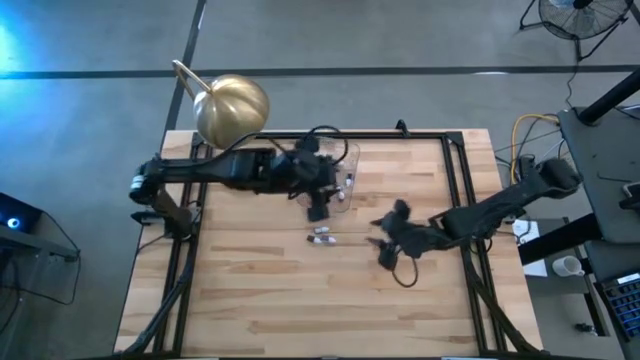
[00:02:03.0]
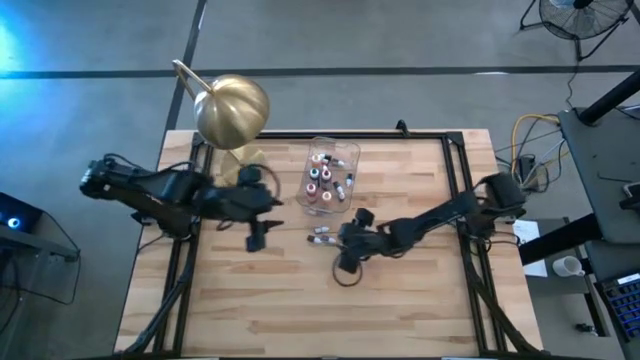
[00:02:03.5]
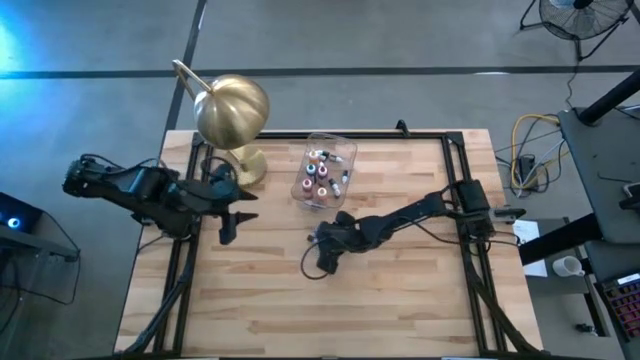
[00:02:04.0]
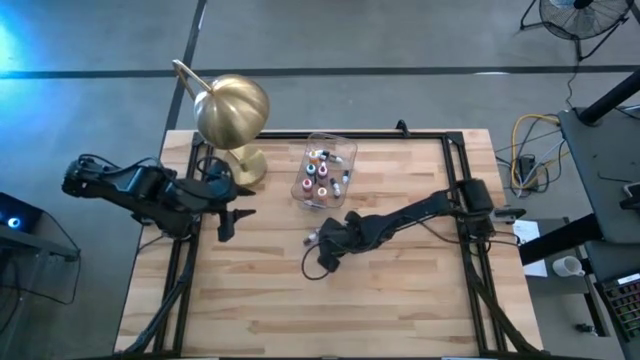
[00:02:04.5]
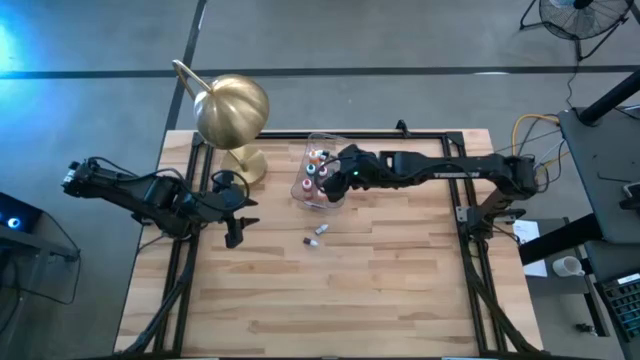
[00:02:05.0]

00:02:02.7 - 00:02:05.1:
Task: Pick & Place food coloring
Put the small purple food coloring bottle into the transparent bin

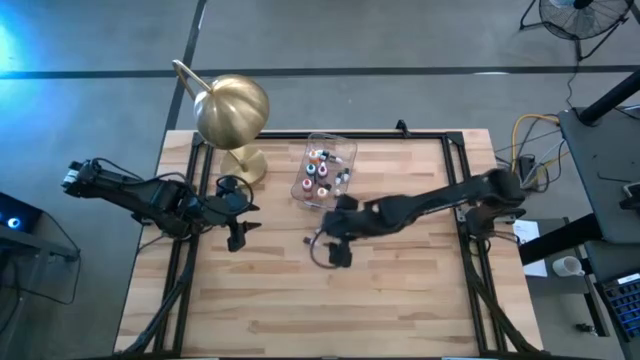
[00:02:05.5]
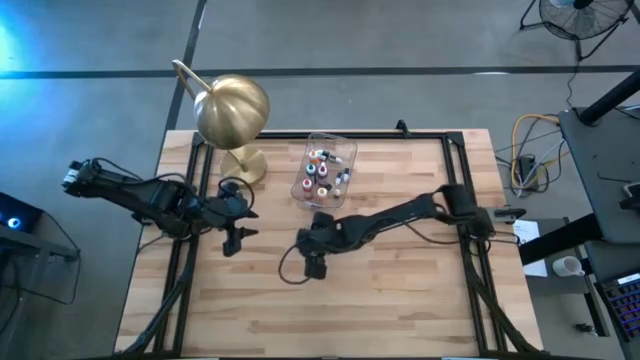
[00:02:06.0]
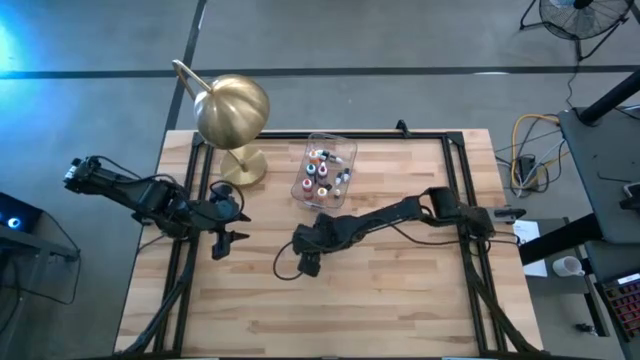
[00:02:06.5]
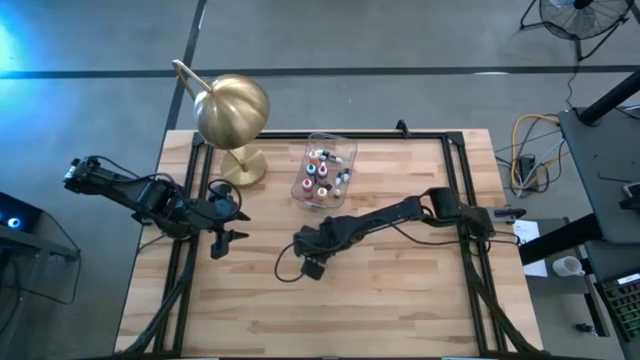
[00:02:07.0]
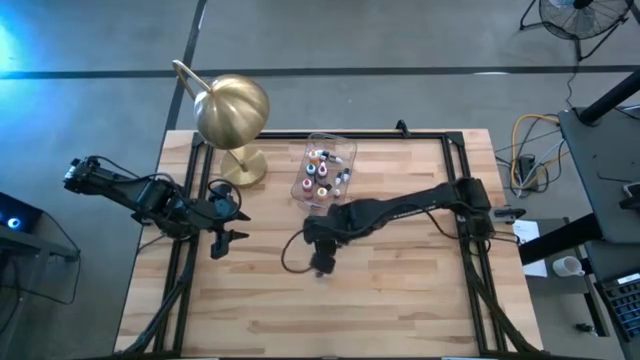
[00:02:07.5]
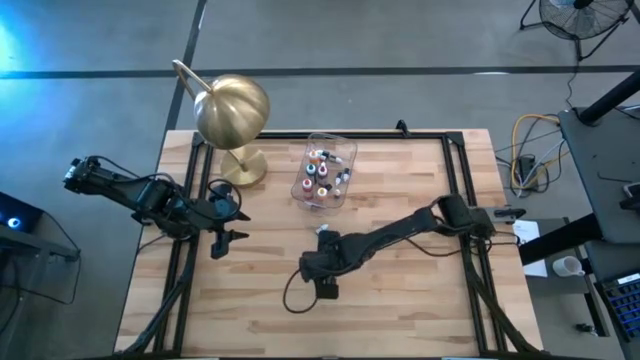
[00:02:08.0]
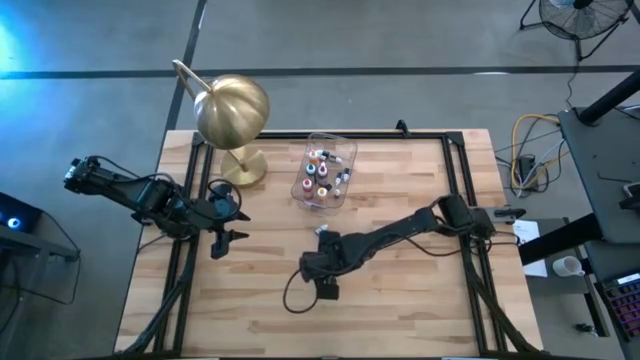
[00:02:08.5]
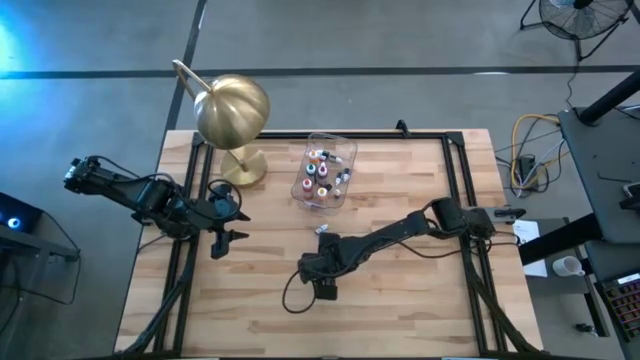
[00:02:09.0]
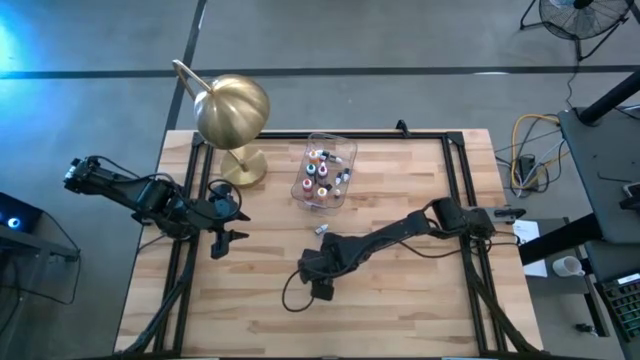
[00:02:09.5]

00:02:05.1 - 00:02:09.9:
Put the small red food coloring bottle into the transparent bin

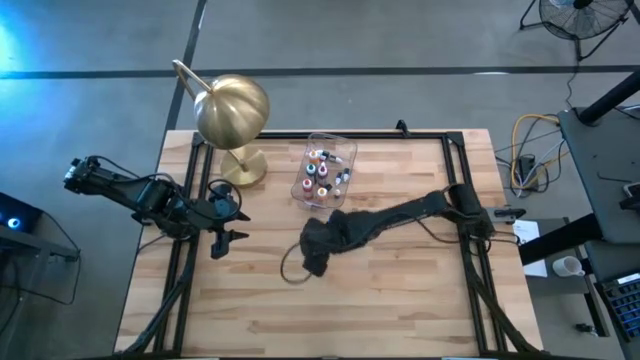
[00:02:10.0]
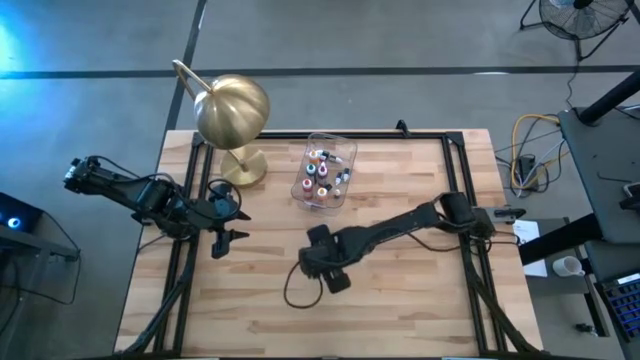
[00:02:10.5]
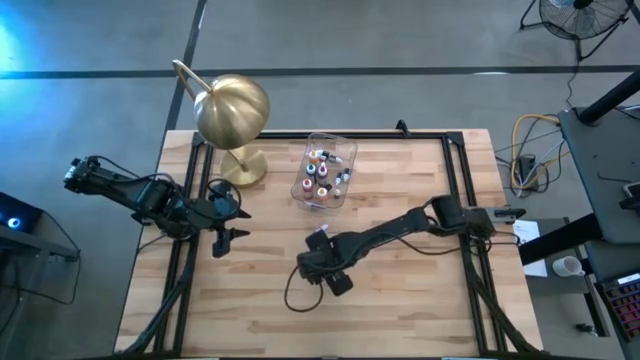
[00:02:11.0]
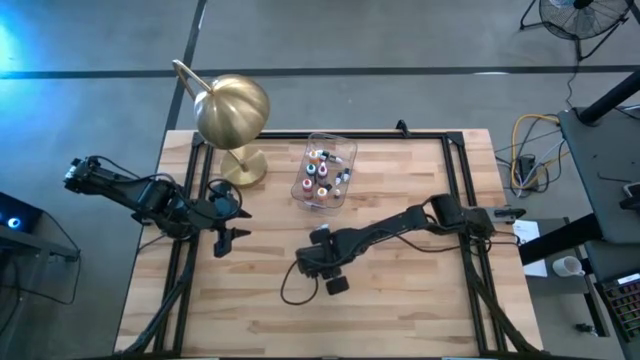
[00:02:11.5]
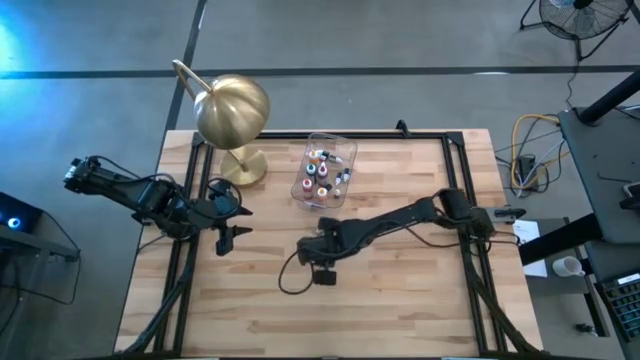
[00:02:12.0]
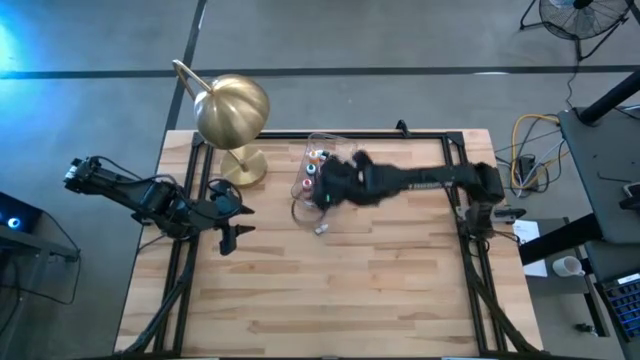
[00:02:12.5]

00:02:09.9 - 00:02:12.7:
Put the small red food coloring bottle into the transparent bin

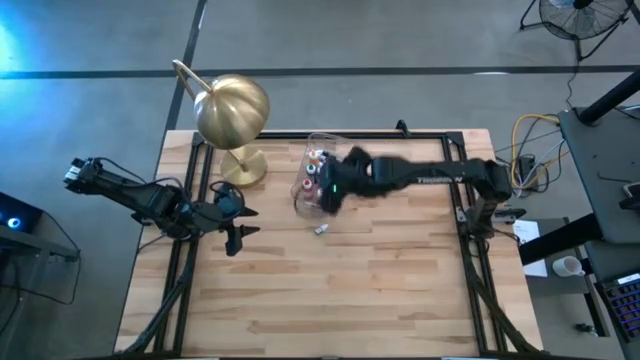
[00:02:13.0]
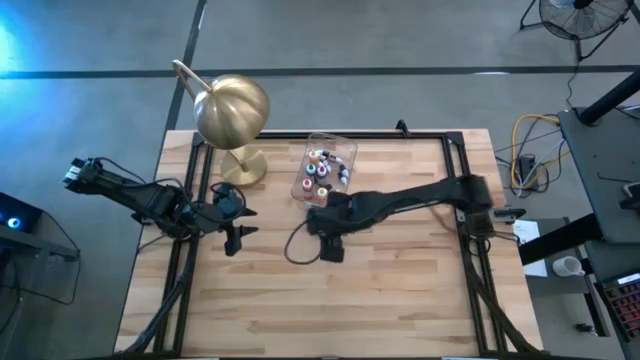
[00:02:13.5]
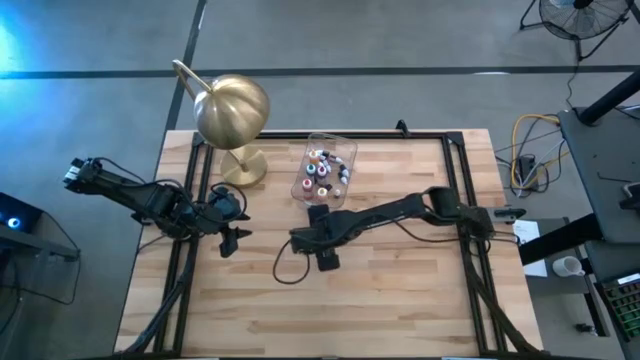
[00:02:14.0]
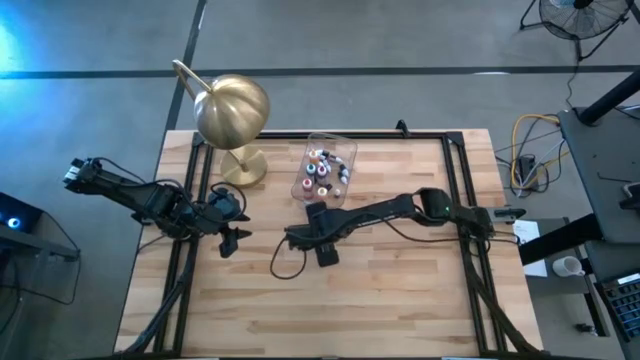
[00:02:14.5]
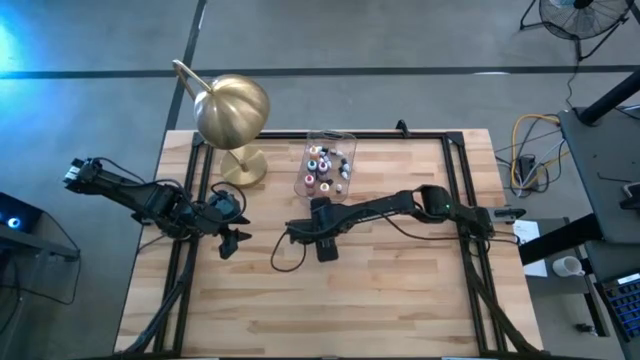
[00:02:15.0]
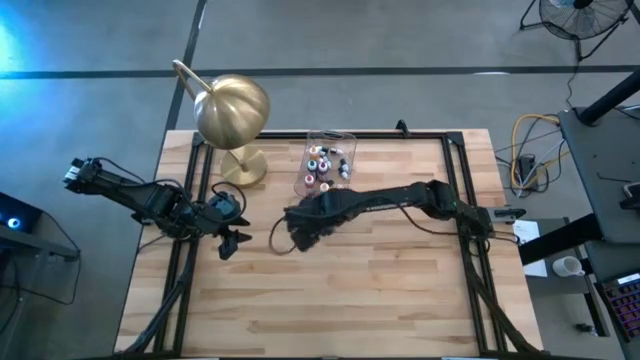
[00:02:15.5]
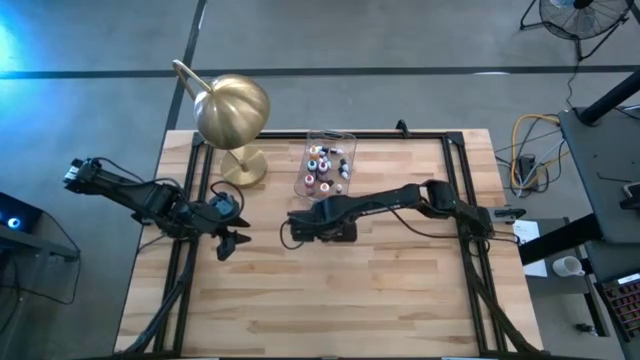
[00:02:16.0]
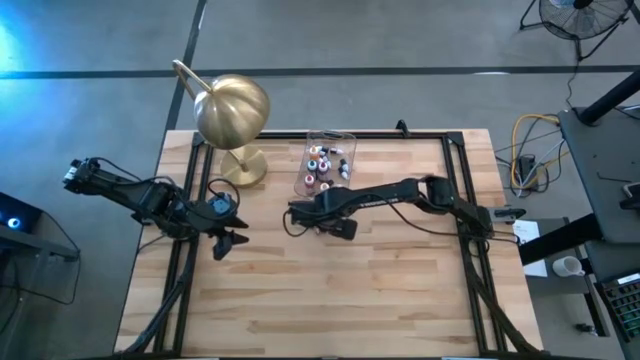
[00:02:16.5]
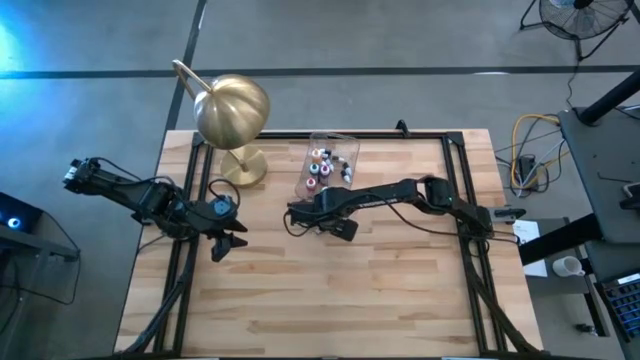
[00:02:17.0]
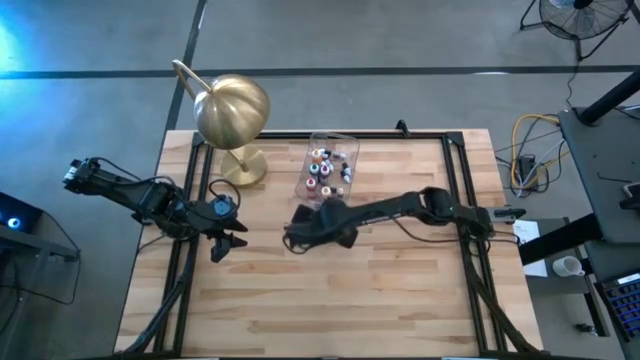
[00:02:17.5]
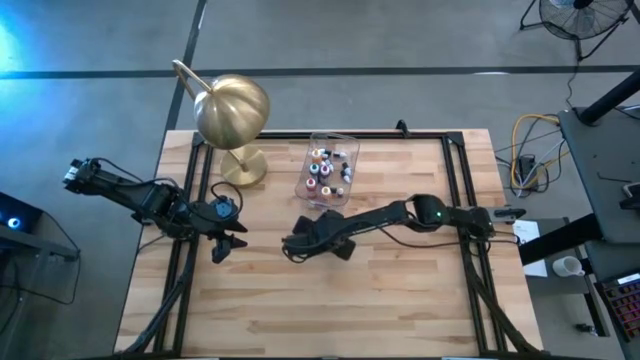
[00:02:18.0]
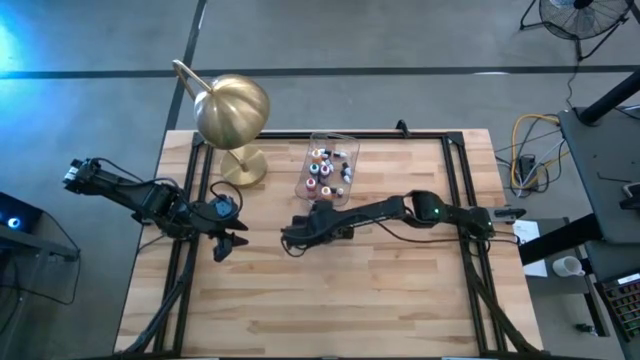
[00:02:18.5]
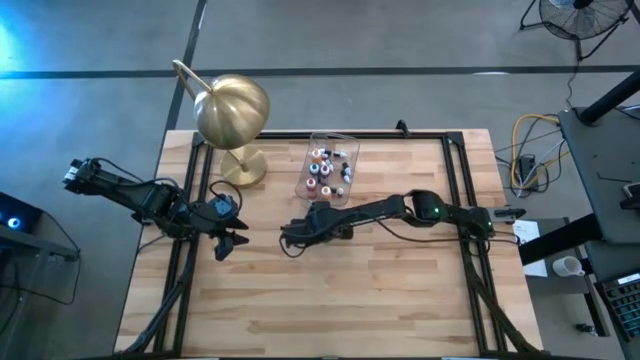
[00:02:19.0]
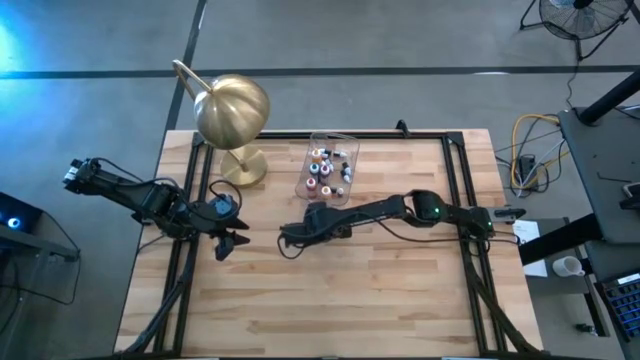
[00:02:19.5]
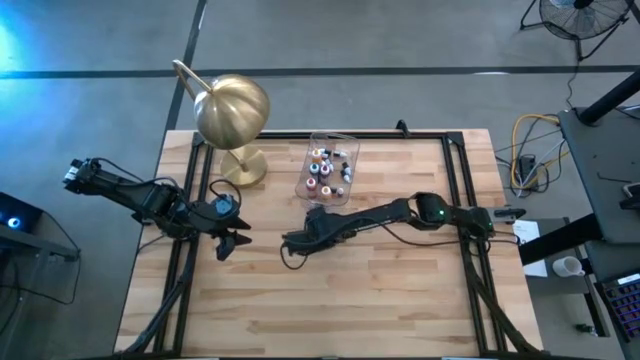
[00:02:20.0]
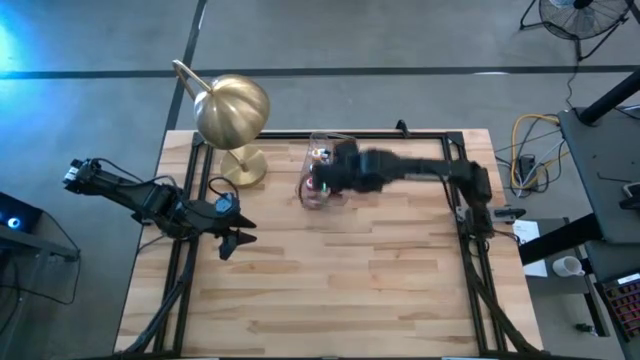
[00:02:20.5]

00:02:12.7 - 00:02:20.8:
Put the small blue food coloring bottle into the transparent bin

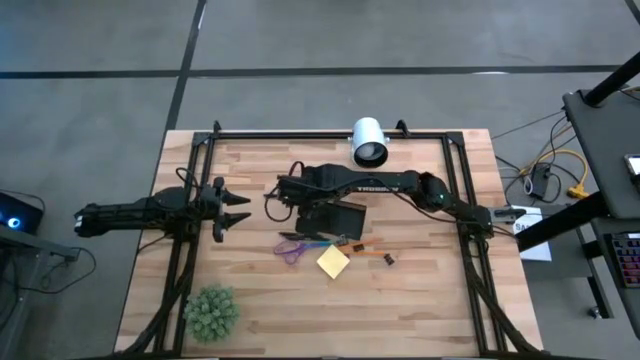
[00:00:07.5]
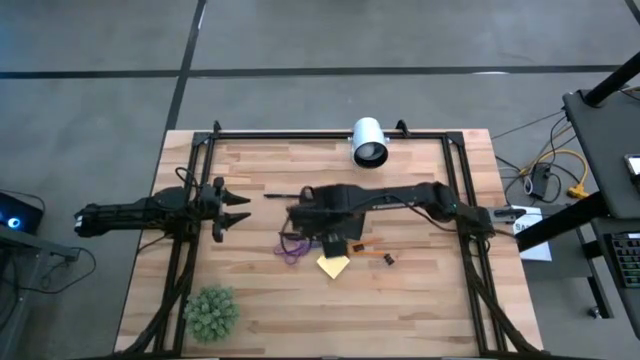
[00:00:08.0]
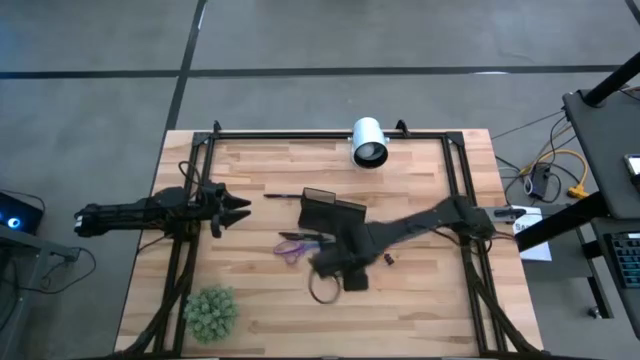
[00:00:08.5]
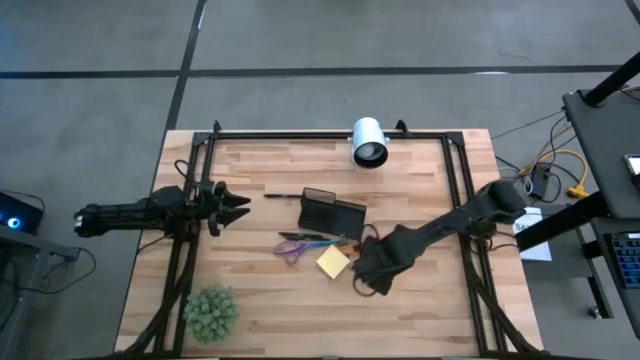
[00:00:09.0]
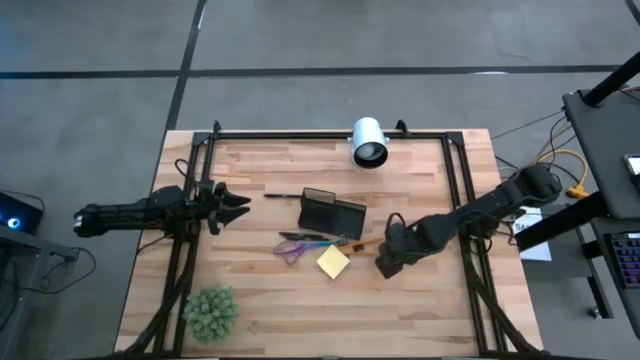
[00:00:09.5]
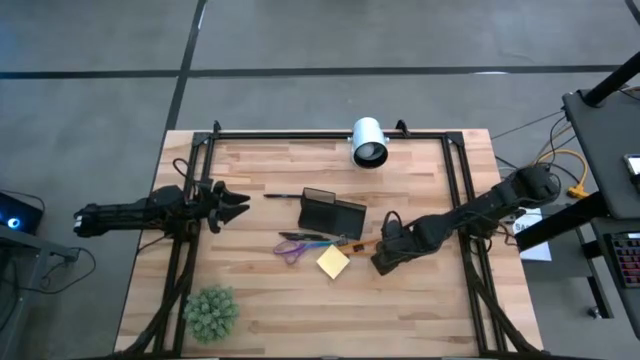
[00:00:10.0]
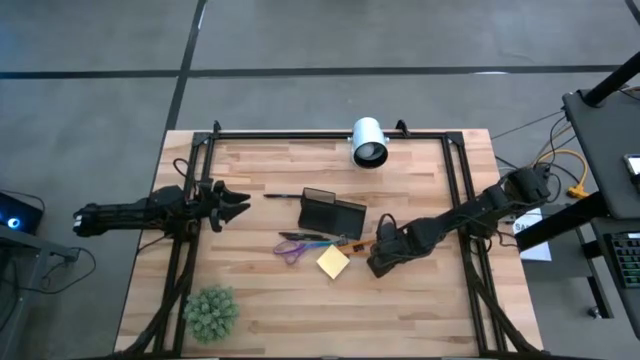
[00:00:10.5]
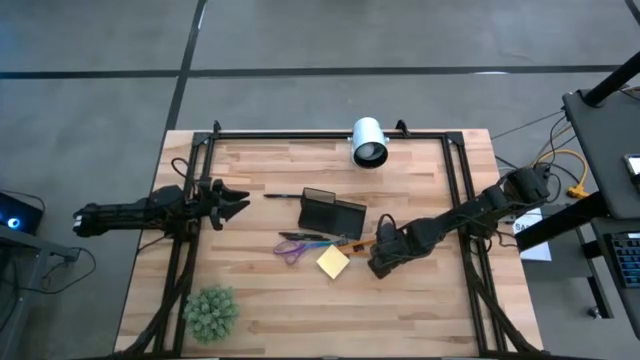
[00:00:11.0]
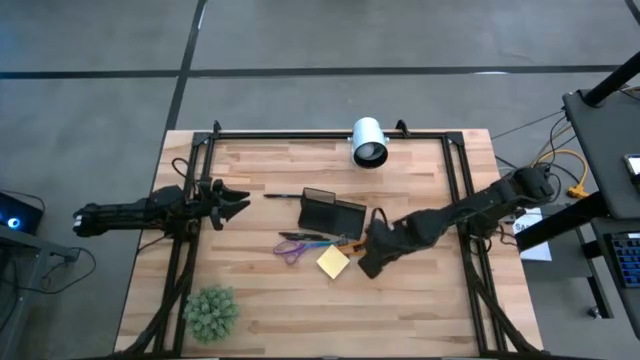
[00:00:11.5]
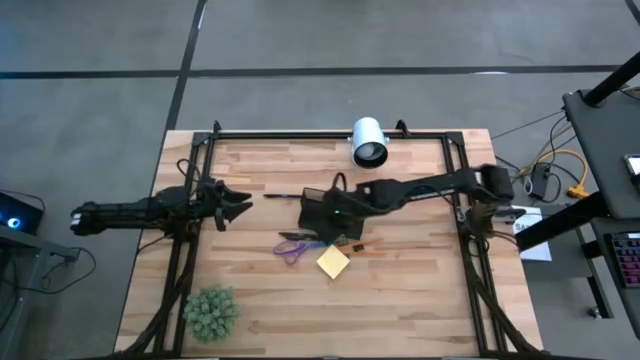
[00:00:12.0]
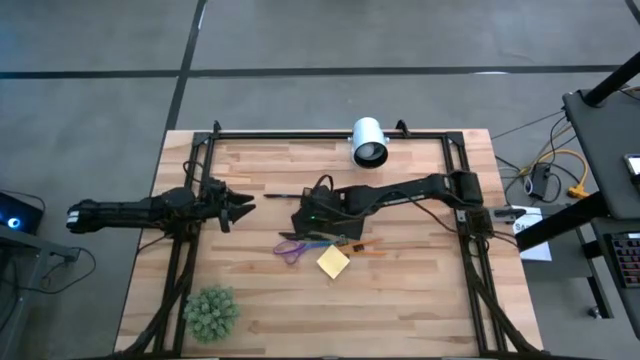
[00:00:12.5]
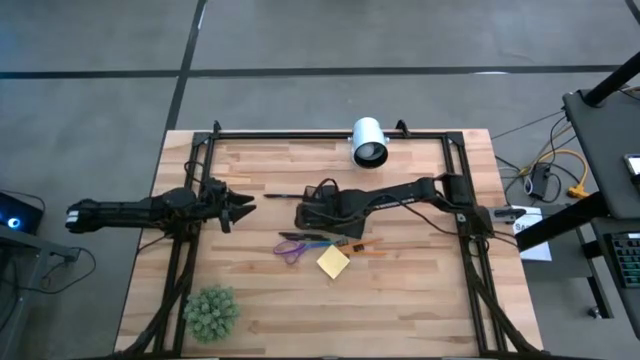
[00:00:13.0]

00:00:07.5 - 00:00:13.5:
Task: Pick and place office supplies into organizer
Put the right black binder clip into the black mesh organizer
